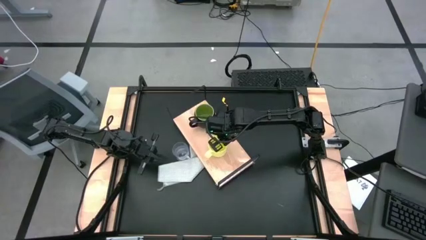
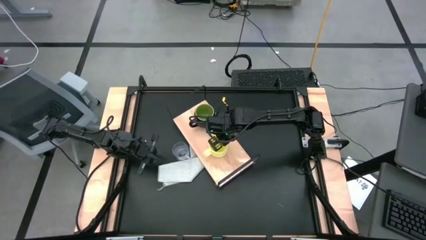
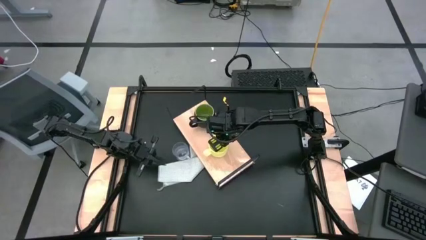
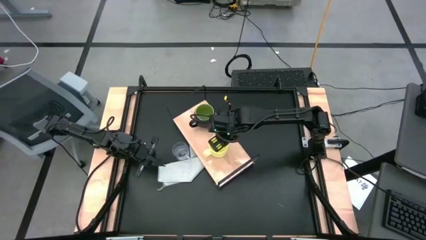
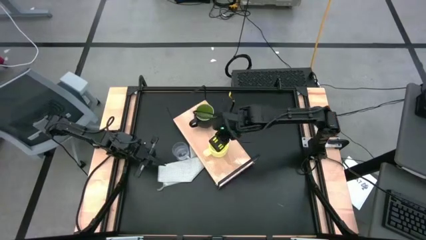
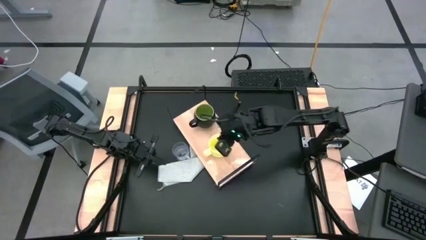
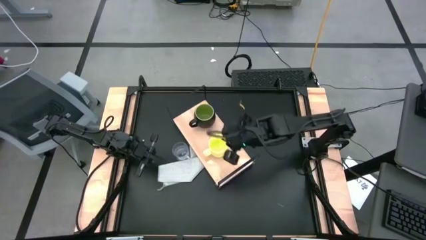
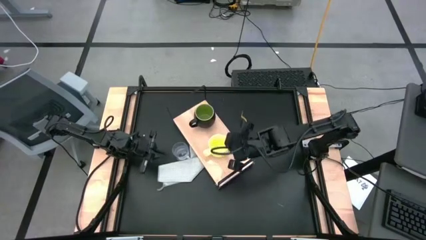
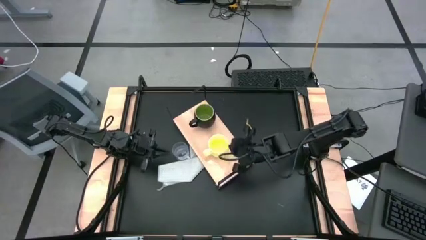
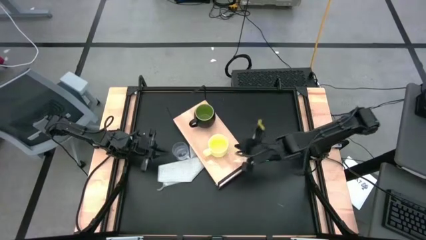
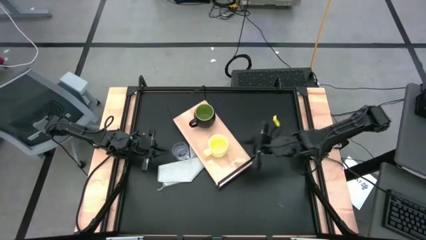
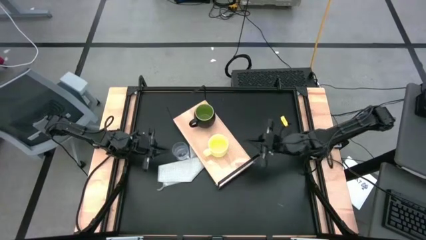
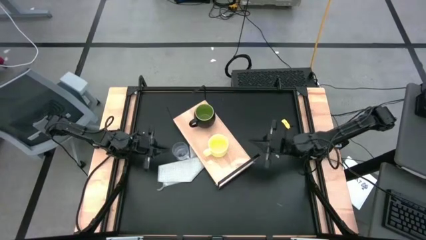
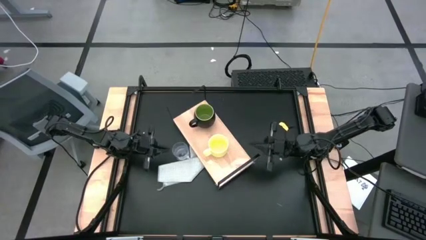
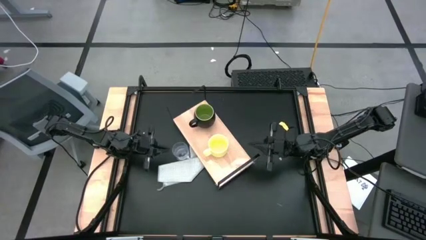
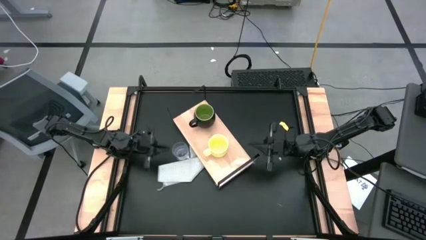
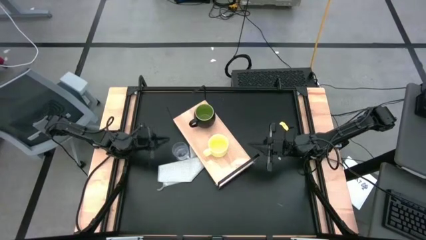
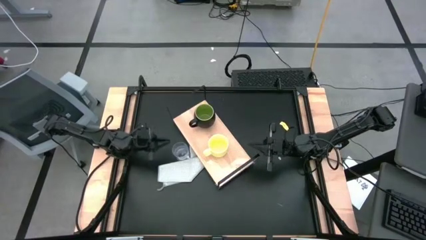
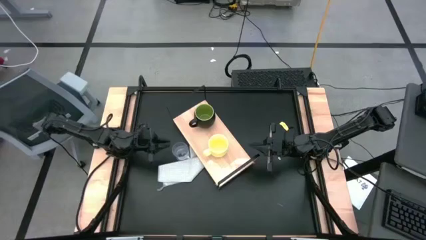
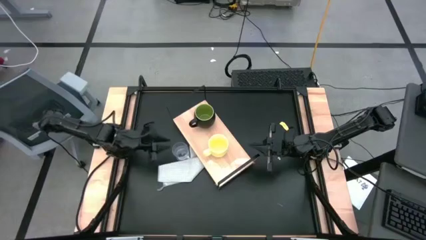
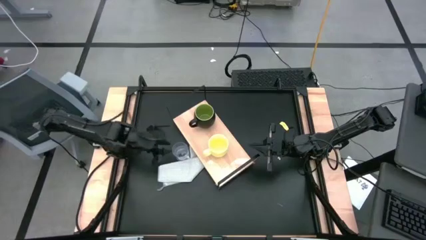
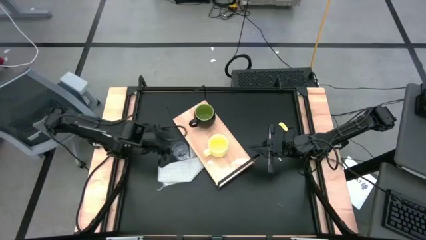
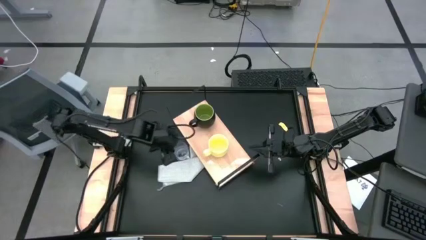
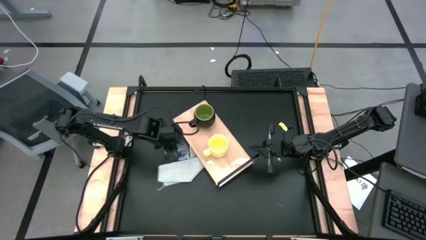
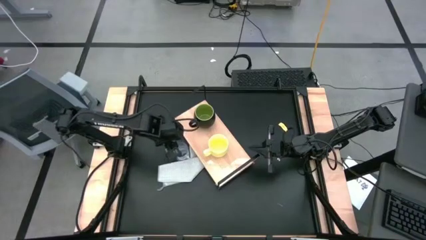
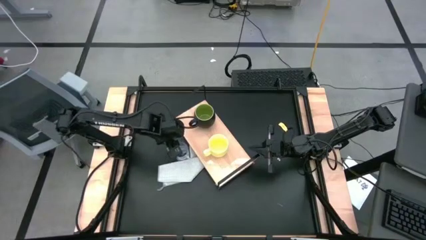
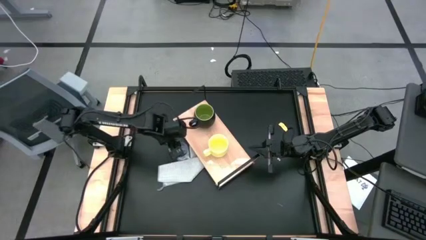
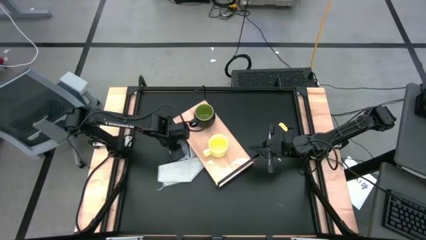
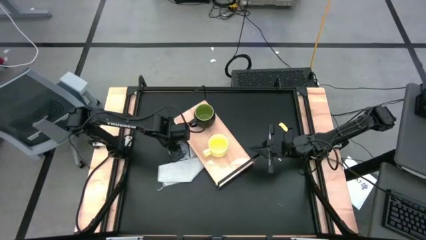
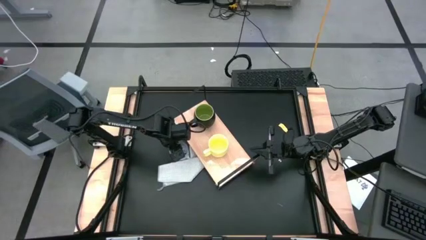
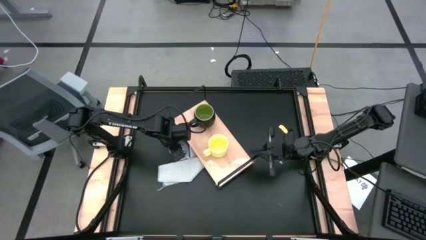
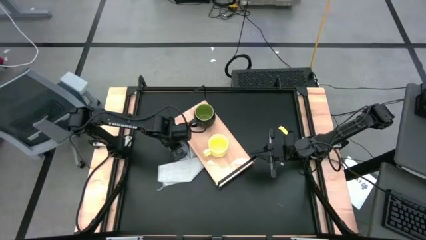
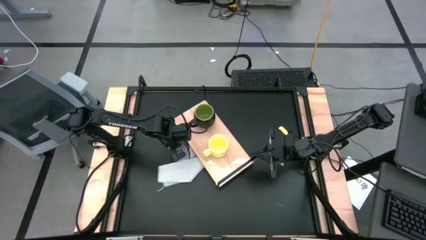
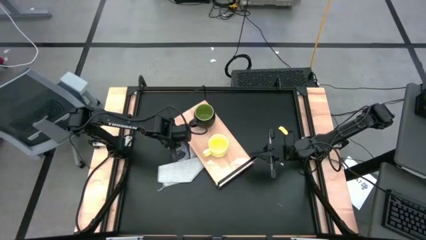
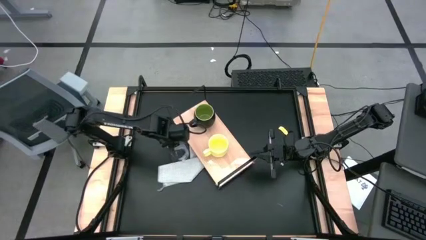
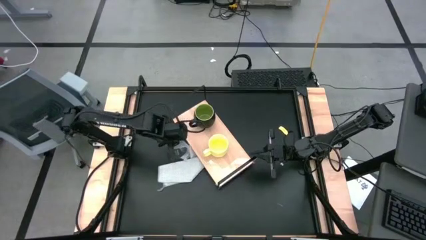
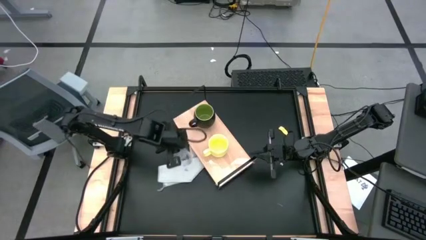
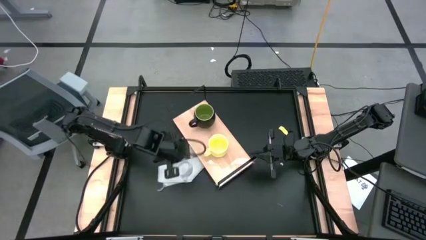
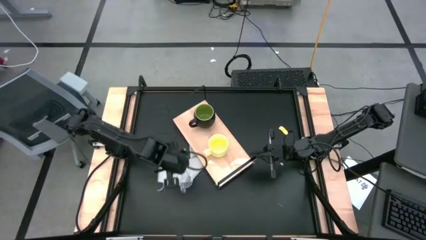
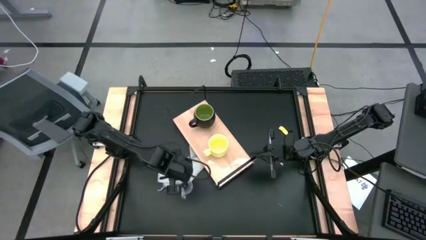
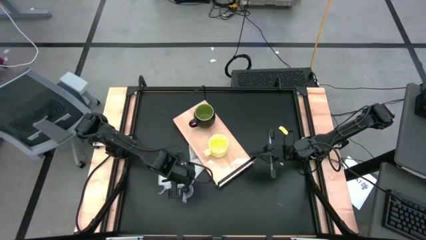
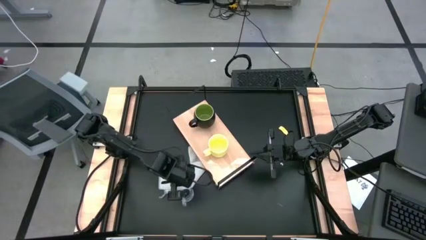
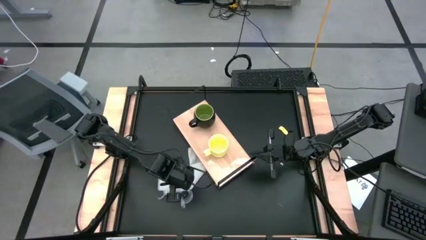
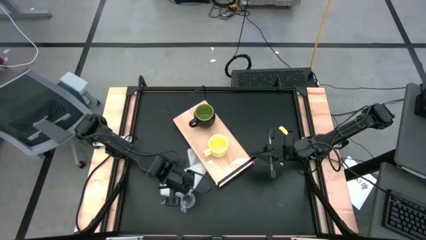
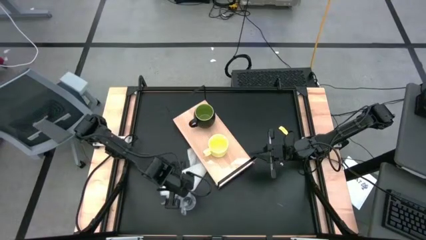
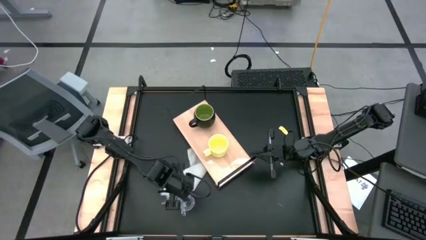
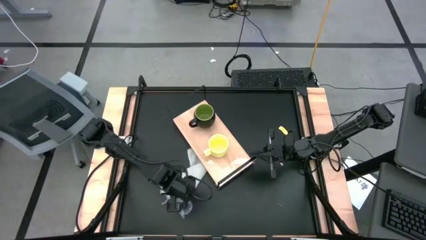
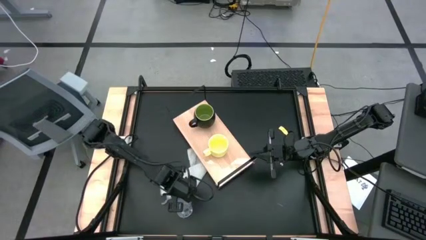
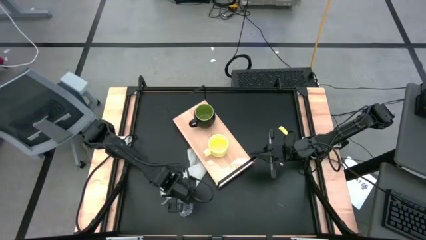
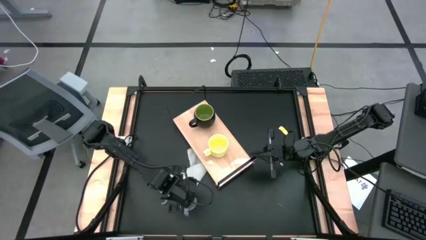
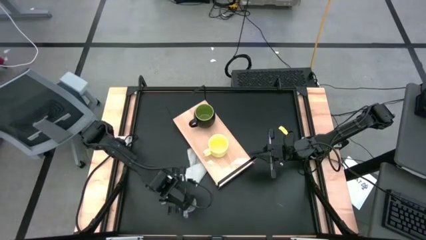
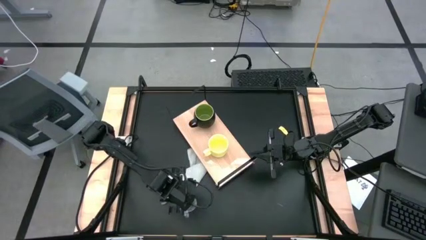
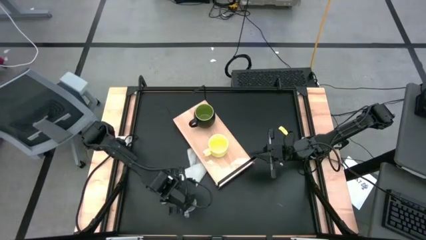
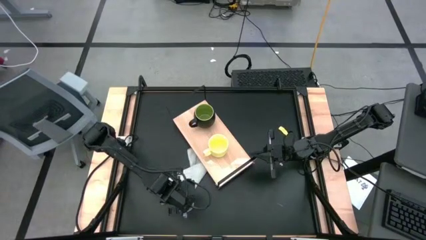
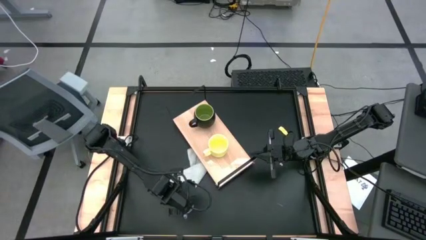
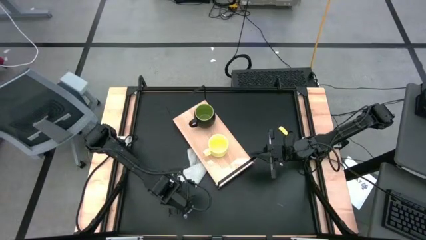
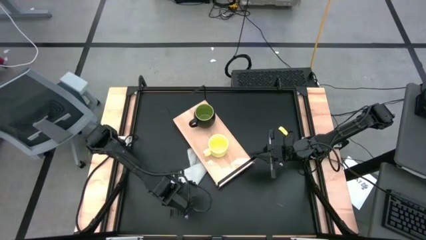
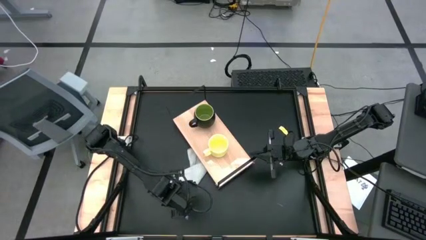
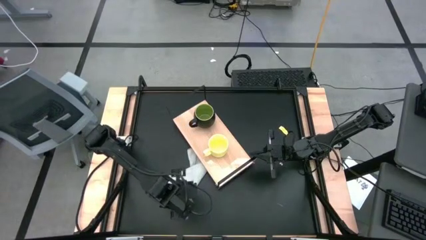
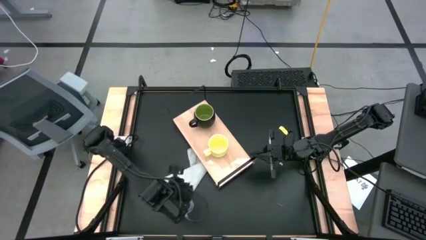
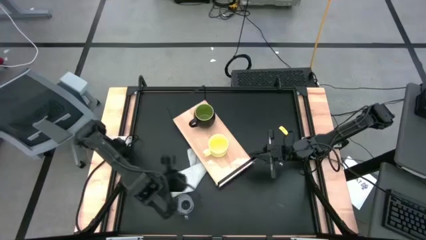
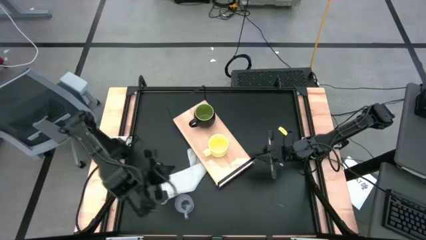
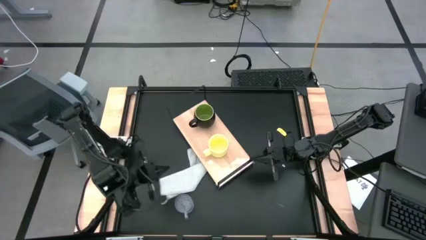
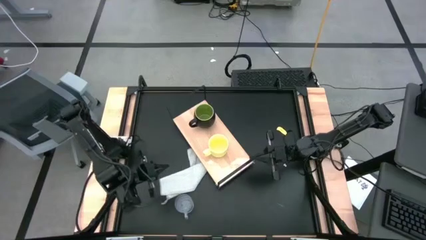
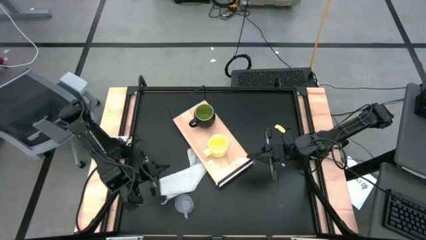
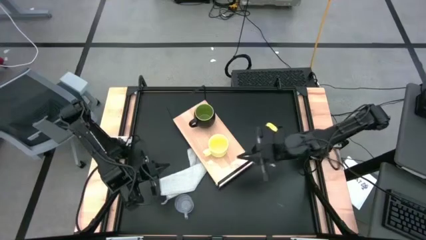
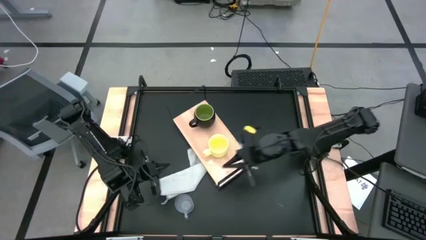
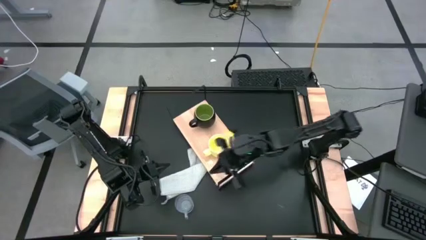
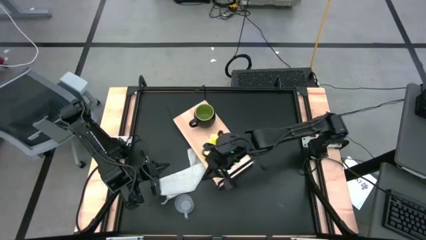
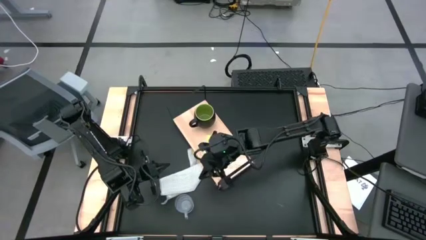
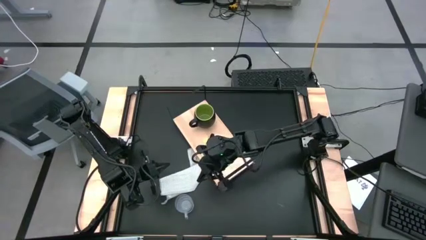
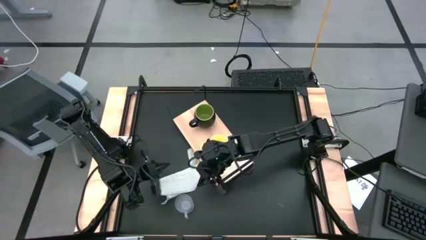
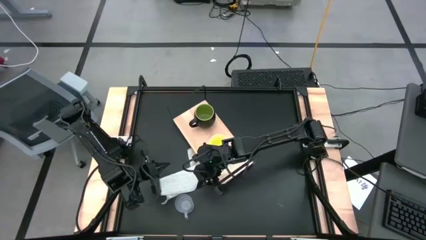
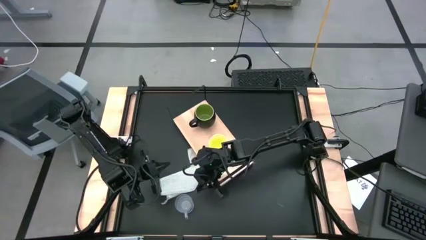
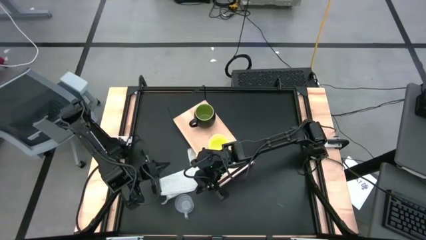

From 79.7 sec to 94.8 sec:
Task: Stack small to large cups/mugs on shelf
Put the transparent mug on the shelf

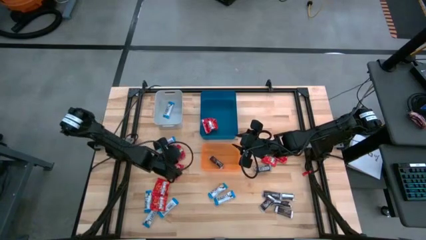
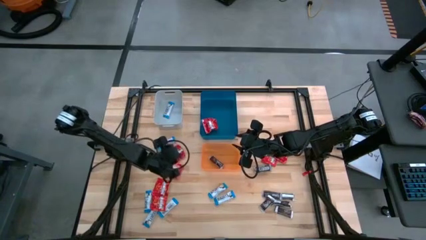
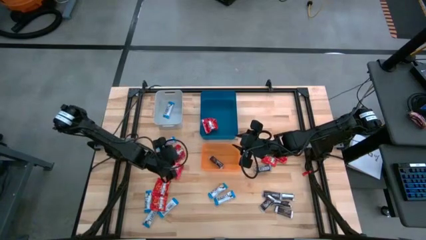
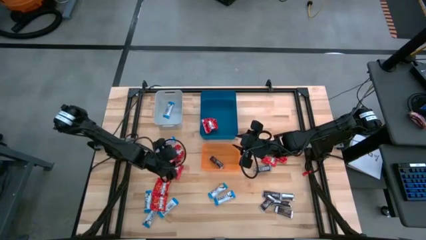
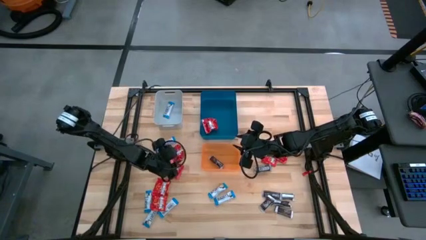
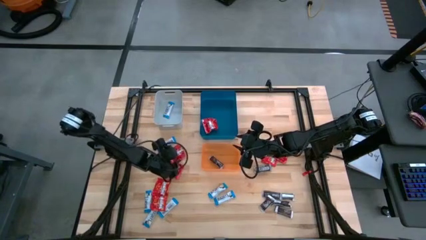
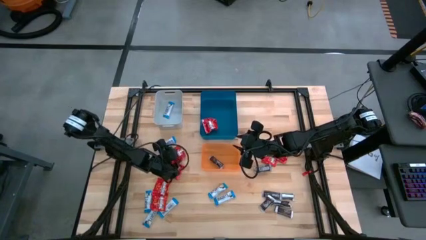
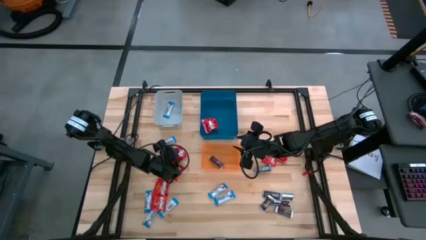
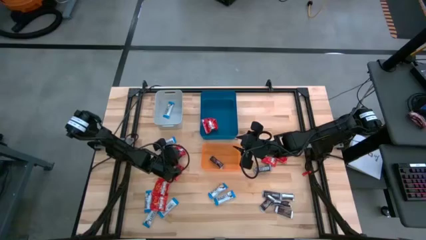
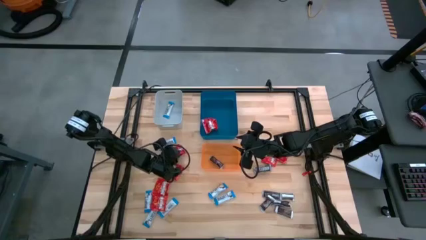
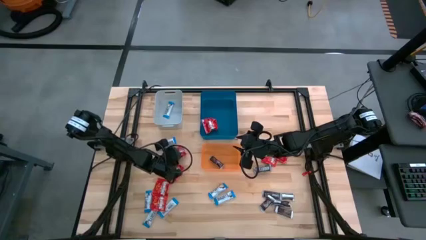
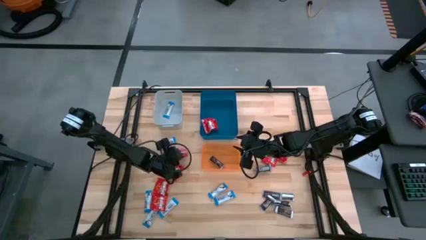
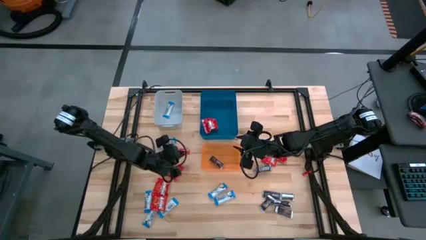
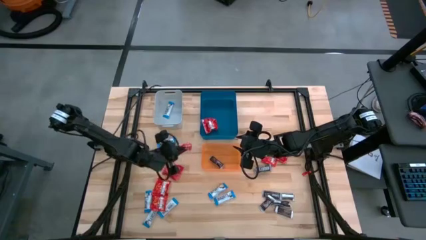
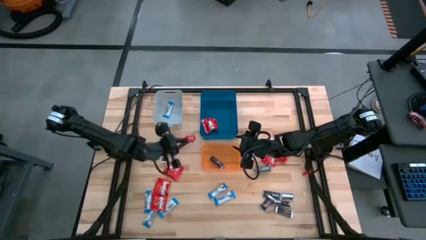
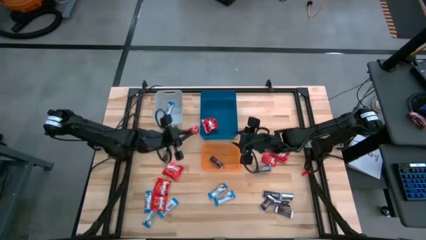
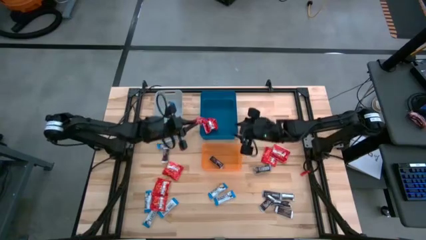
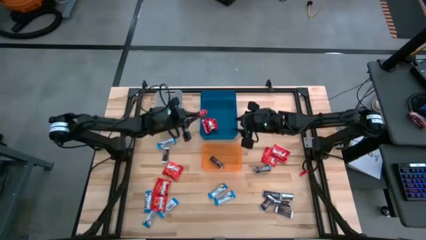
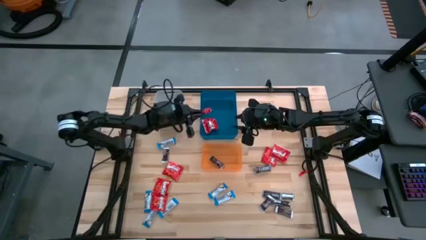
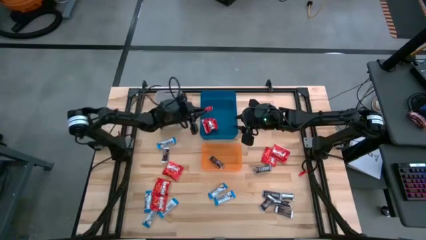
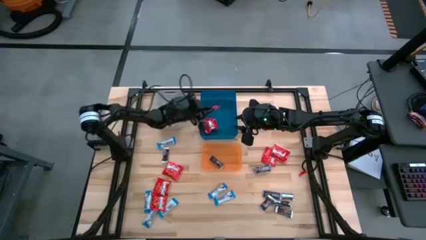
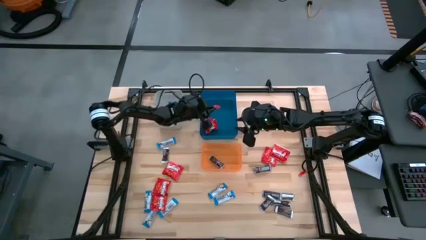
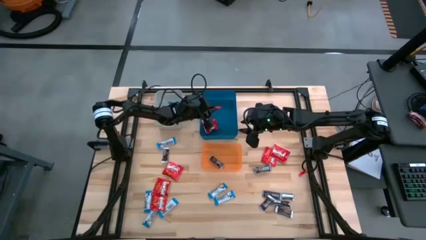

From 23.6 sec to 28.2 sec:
Task: Sort candy
Put the red candy into the blue bin
